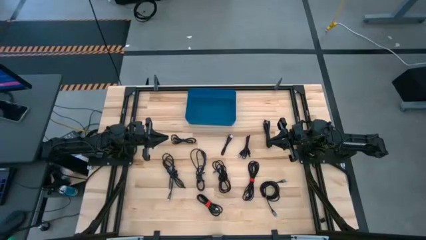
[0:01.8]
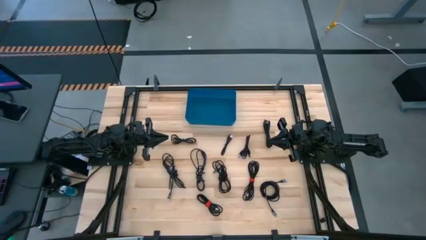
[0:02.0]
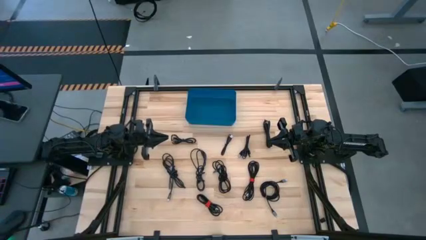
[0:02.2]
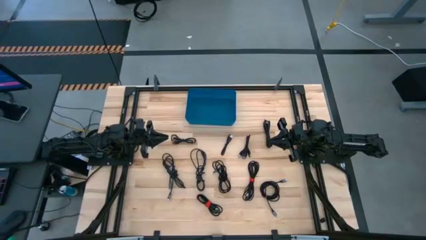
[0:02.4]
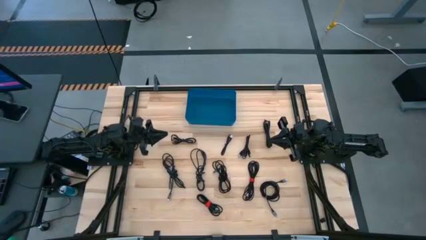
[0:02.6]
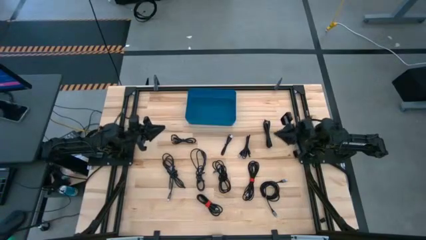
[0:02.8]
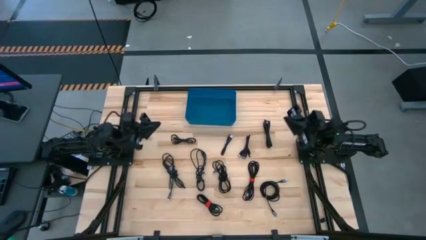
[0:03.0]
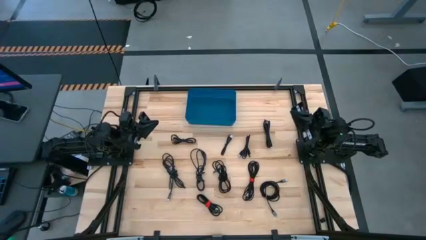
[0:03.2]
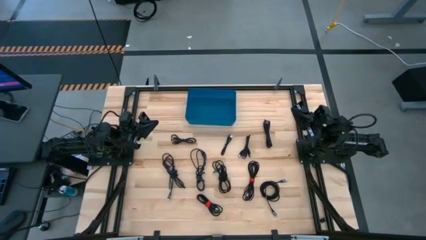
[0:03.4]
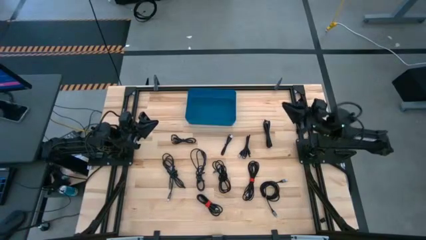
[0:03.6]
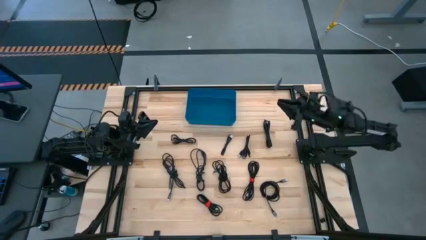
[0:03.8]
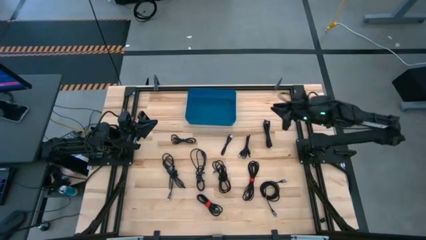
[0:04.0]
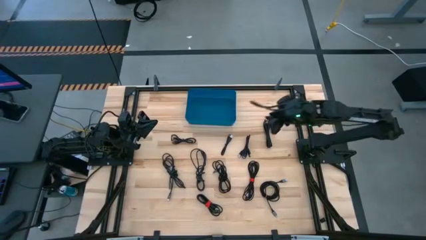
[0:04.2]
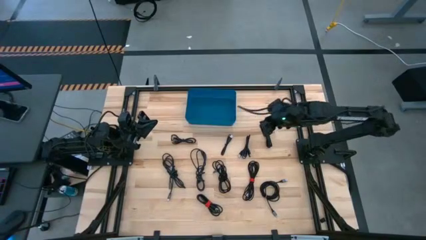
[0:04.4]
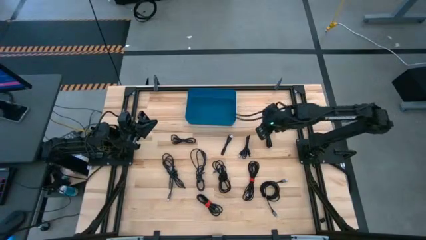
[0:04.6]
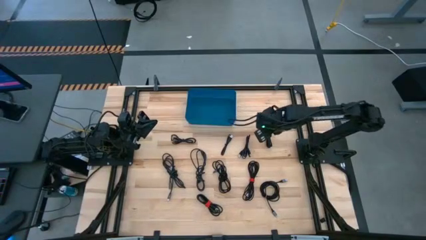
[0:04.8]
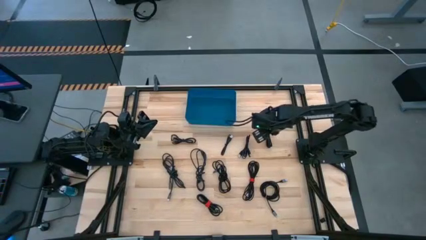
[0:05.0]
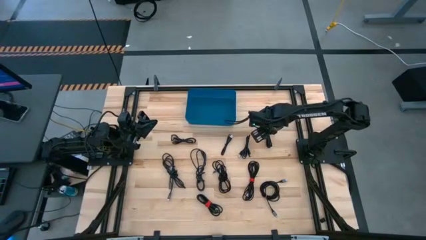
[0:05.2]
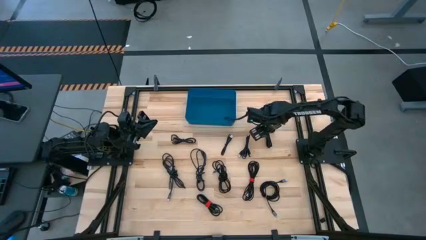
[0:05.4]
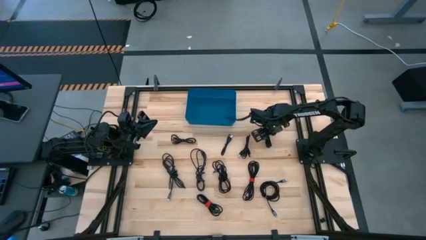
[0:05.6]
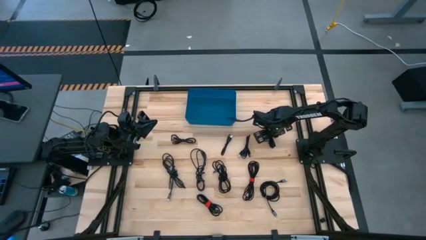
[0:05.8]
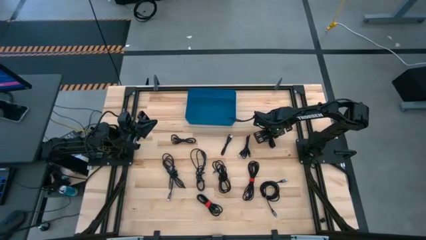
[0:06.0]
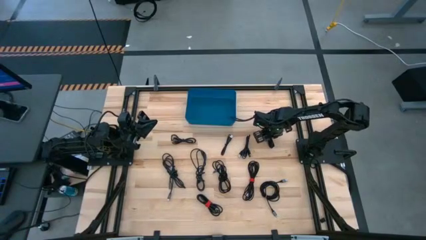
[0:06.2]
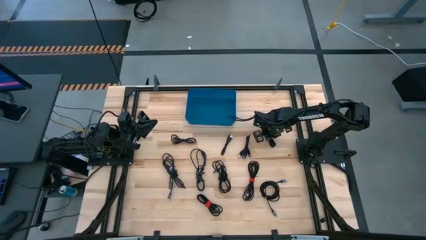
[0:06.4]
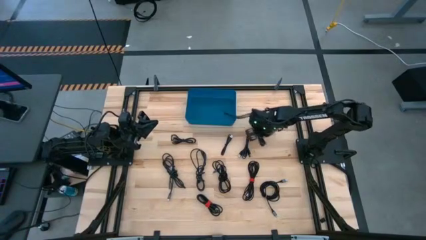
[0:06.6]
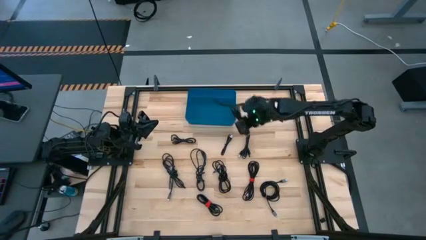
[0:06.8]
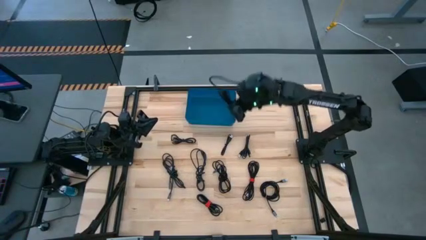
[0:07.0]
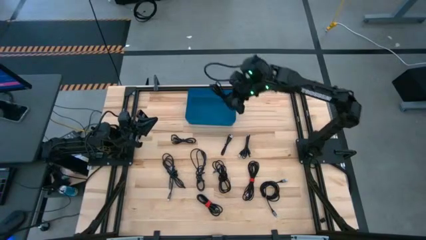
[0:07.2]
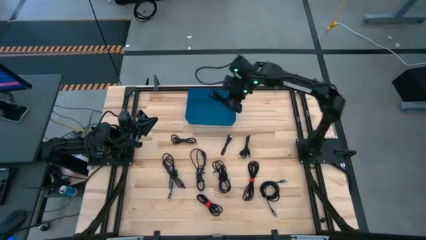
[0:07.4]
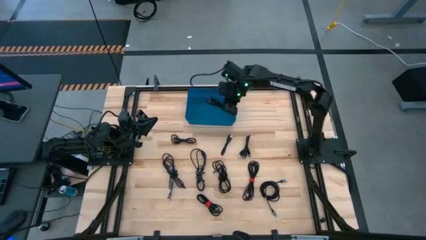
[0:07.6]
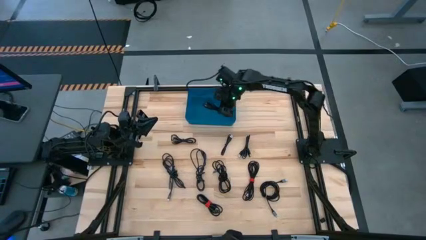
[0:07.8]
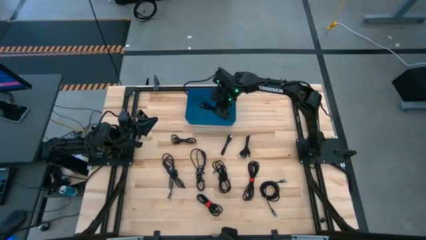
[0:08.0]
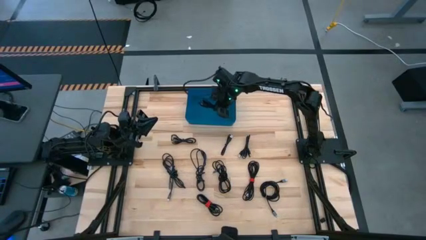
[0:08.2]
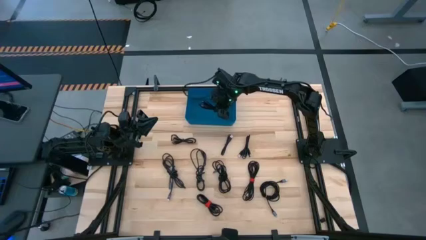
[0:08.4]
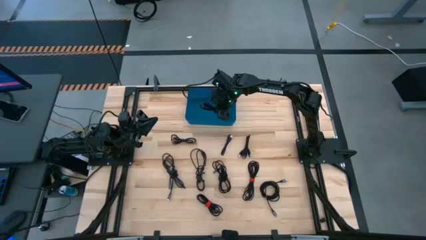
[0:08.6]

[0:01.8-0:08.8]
Task: Pick and place USB-C Cables
Put the black charger cable into the blue bin

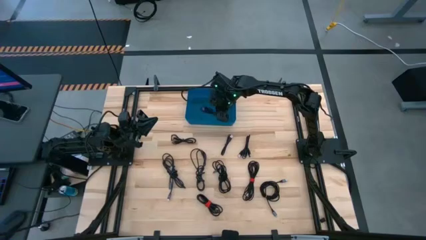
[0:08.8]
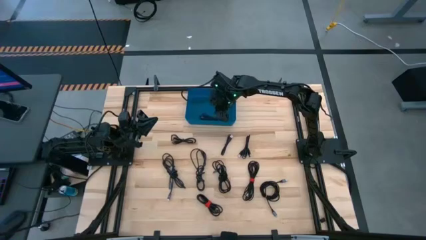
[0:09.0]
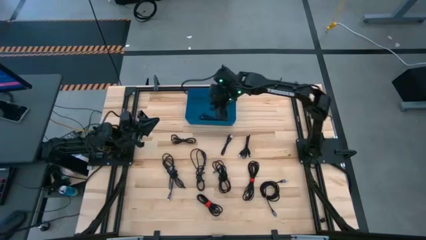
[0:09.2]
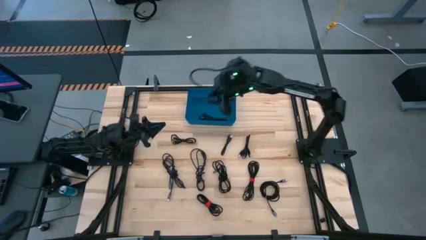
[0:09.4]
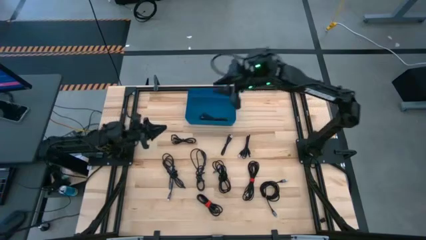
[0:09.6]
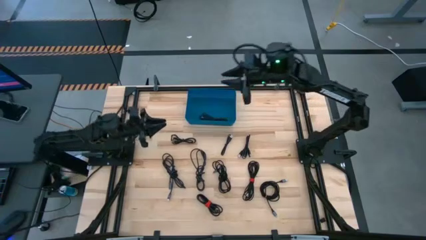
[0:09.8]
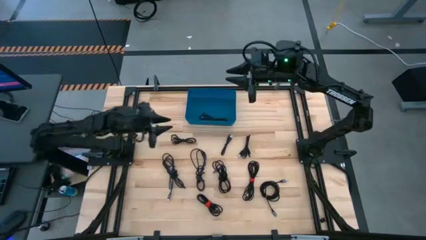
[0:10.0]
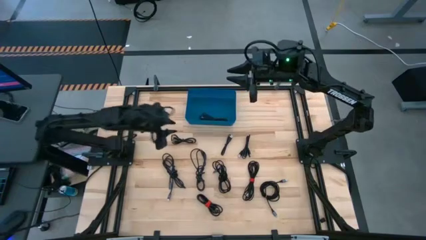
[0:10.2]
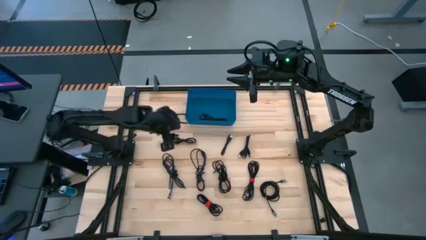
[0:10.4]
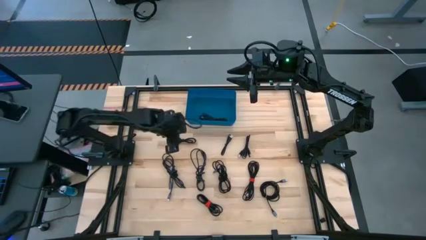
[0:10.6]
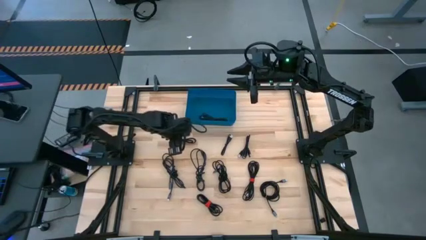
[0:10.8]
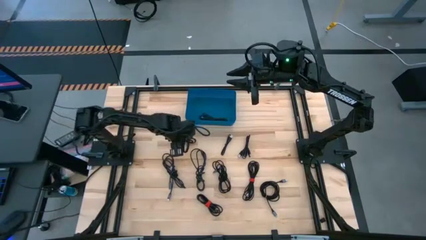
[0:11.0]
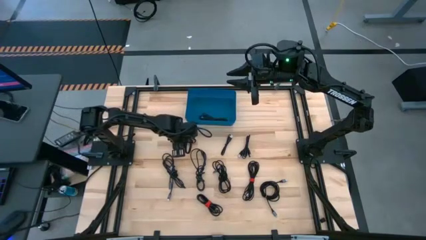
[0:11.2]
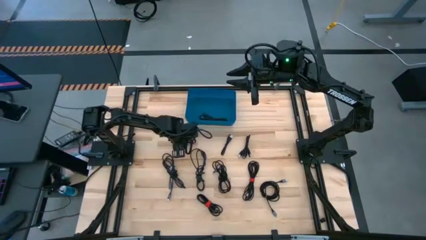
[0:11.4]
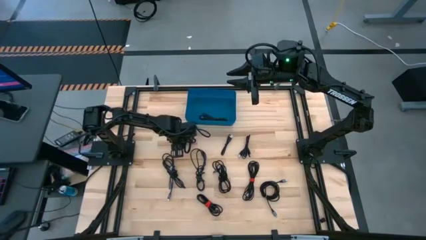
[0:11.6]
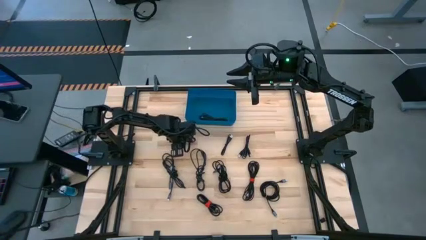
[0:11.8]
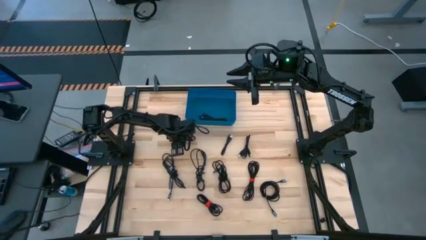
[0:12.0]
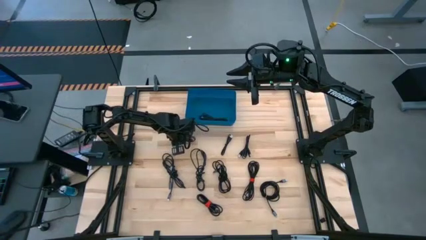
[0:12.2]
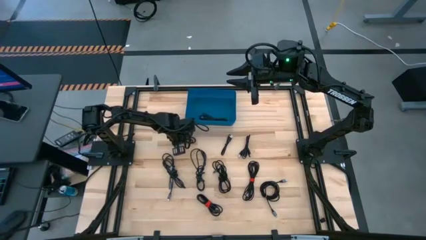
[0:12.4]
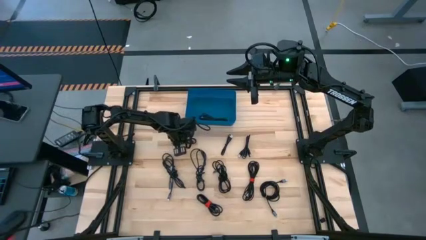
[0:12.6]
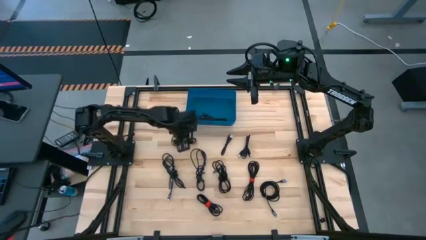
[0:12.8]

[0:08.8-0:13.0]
Put the black charger cable into the blue bin

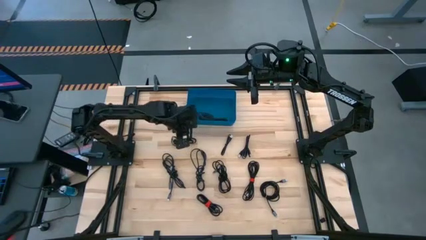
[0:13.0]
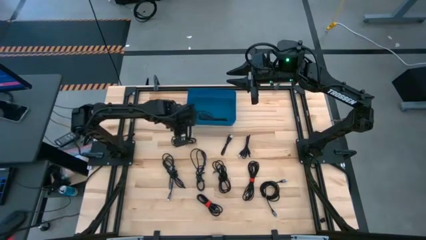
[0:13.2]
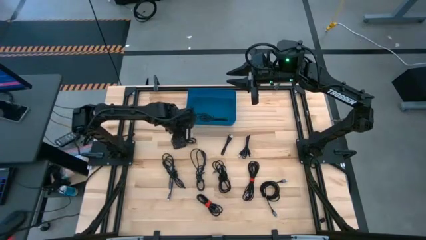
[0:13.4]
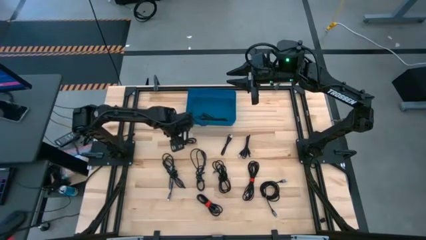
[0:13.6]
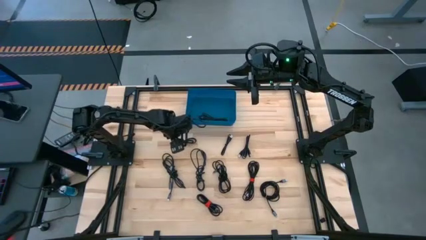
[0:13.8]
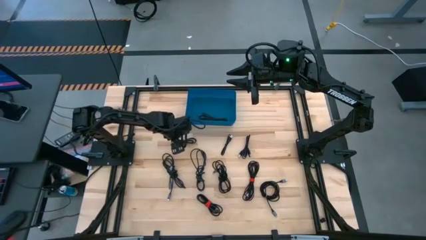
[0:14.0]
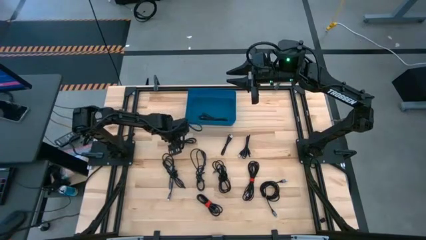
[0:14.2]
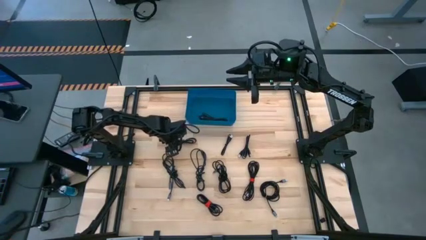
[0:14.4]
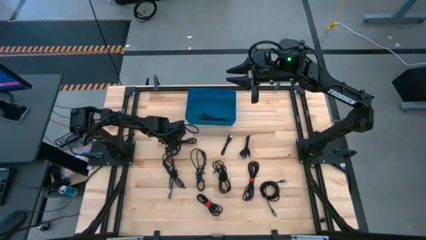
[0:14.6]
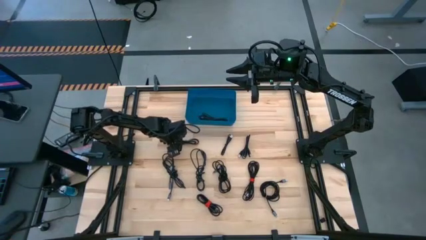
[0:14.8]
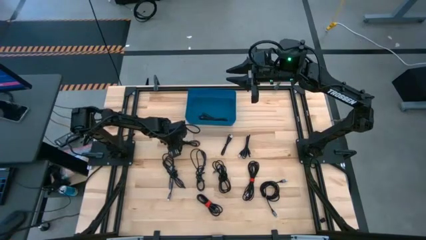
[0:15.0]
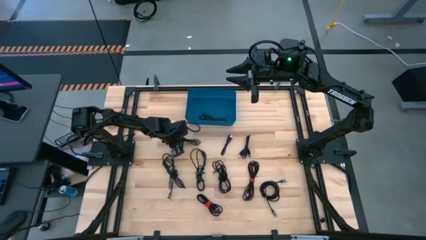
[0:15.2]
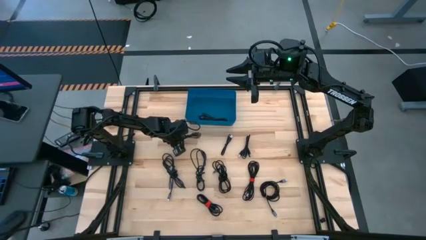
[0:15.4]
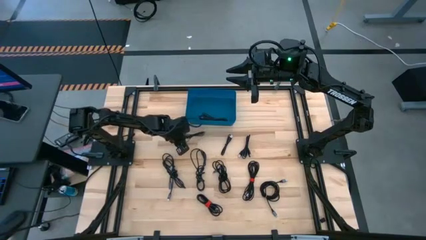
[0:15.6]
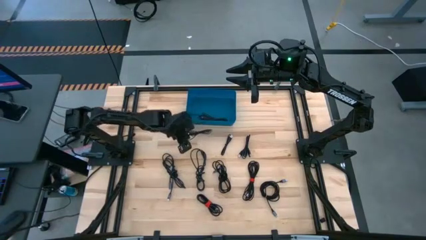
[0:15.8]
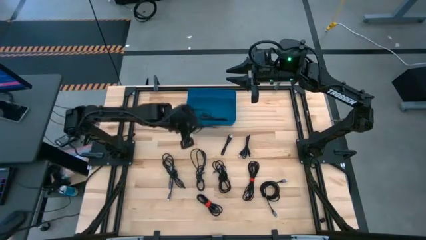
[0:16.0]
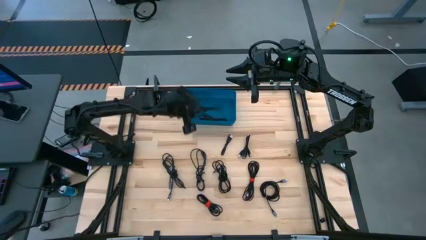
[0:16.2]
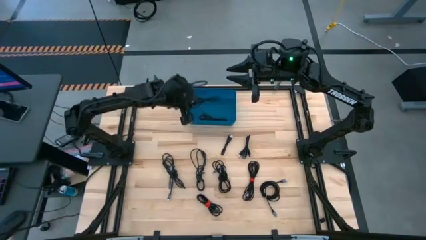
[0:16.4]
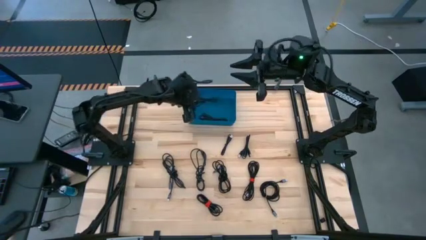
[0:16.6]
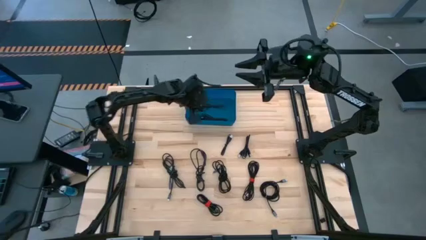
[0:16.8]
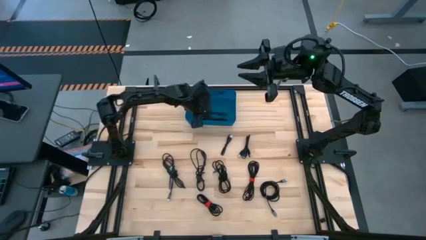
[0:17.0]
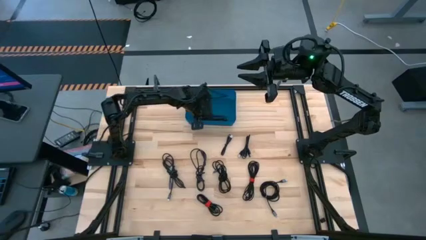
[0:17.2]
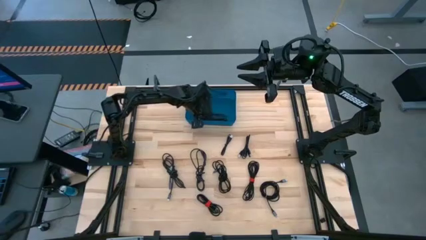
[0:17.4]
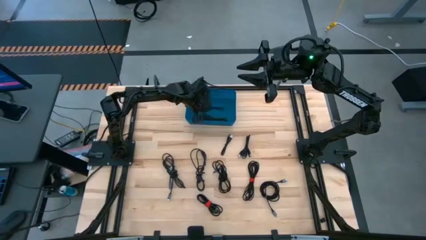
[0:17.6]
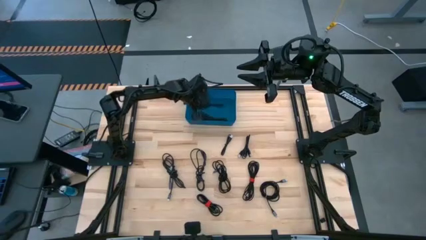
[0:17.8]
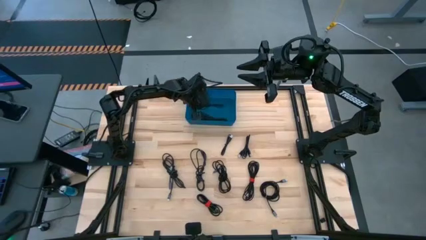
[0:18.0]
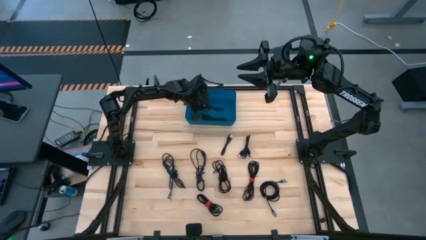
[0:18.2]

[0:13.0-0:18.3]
Put the black charger cable into the blue bin
